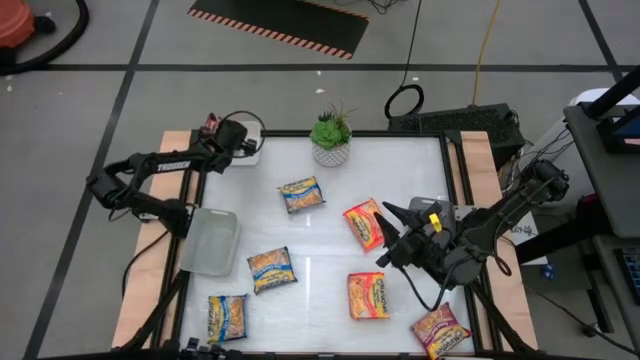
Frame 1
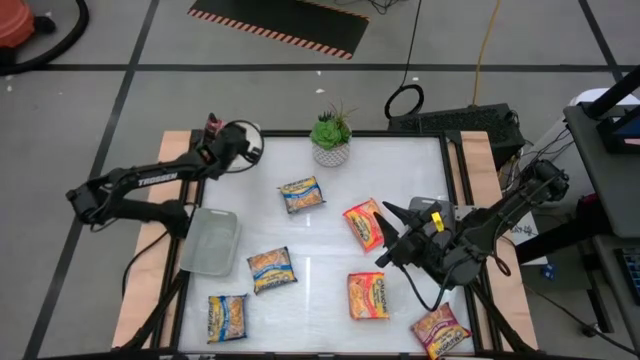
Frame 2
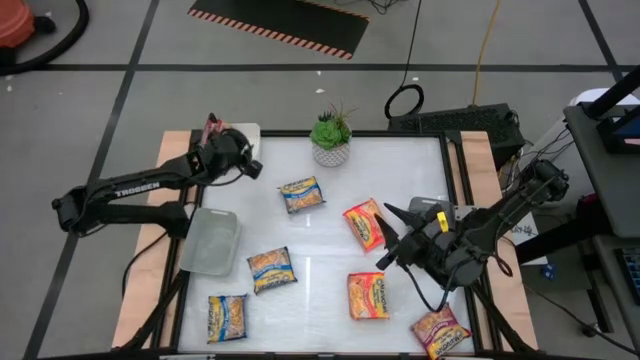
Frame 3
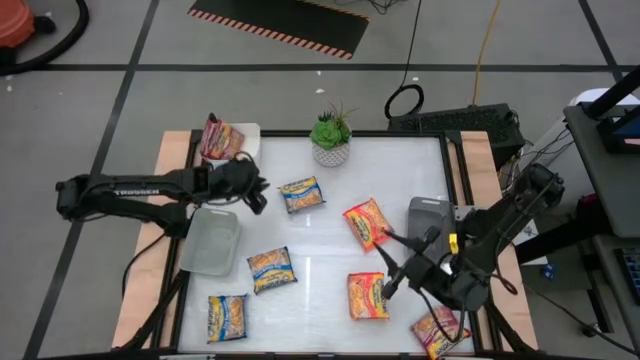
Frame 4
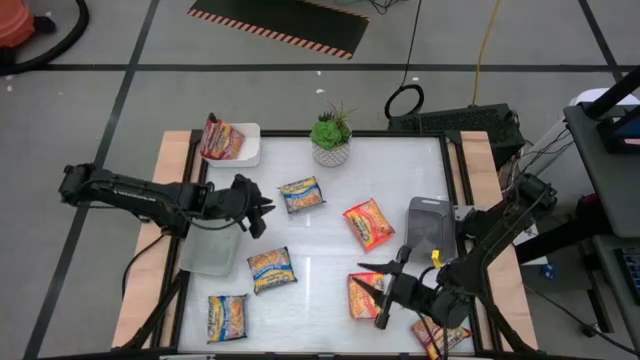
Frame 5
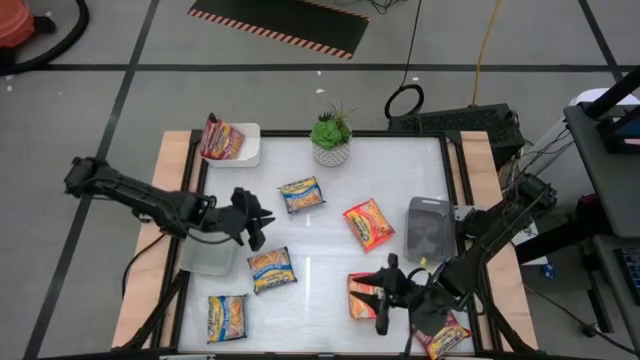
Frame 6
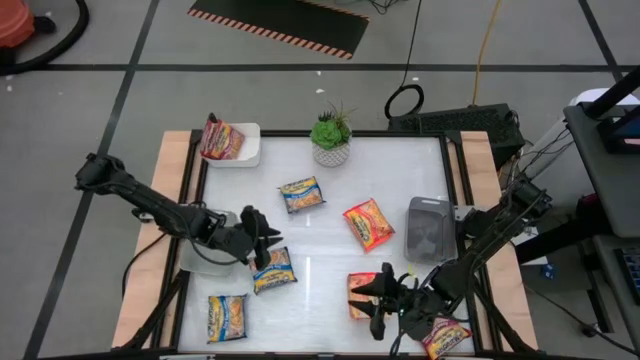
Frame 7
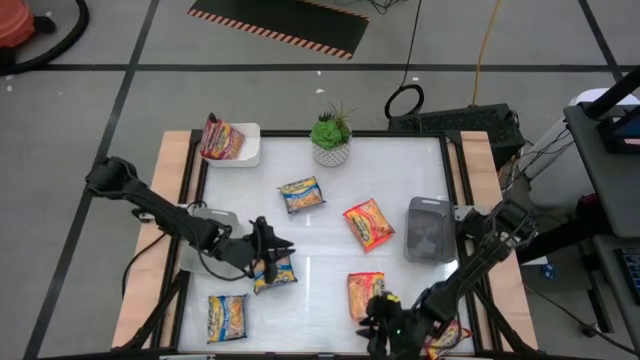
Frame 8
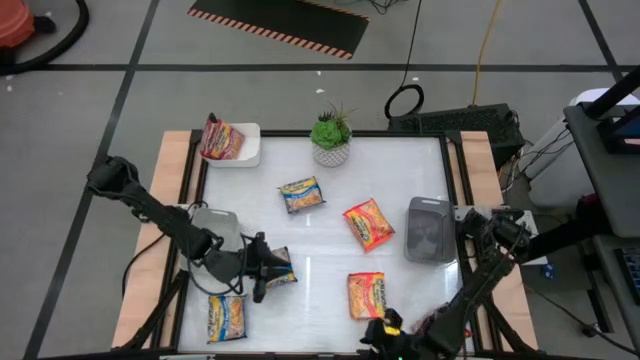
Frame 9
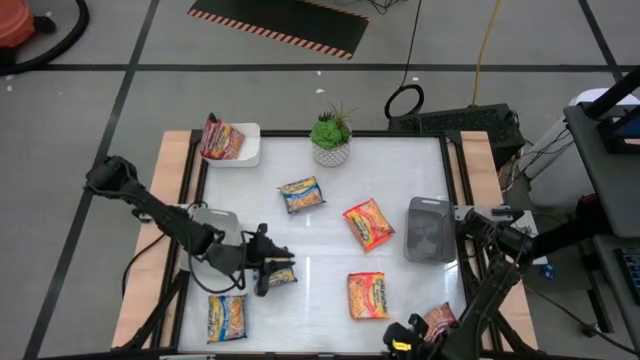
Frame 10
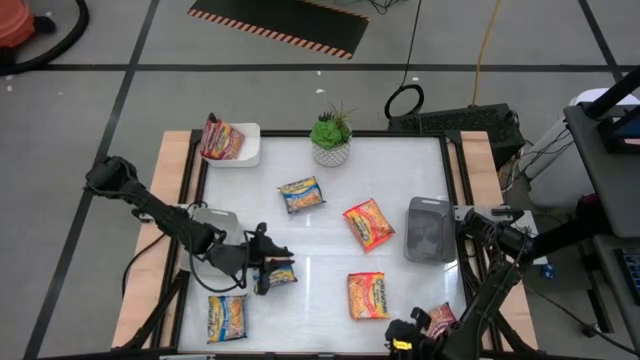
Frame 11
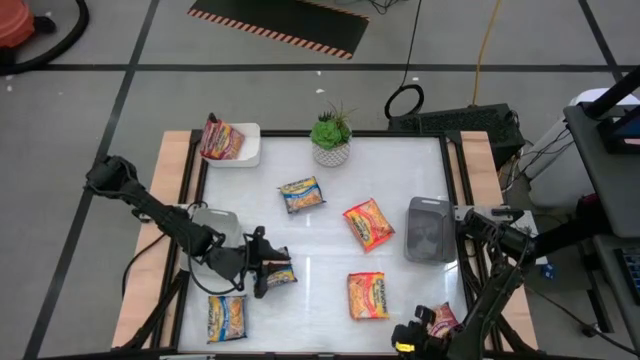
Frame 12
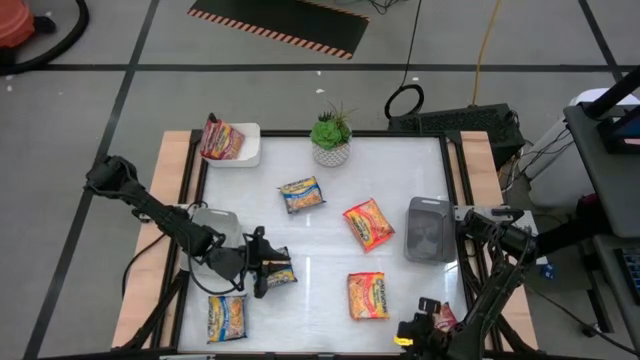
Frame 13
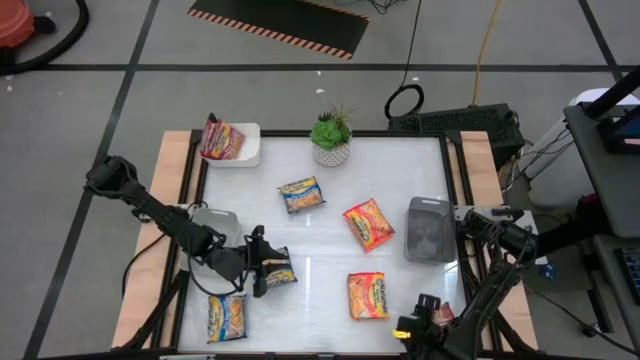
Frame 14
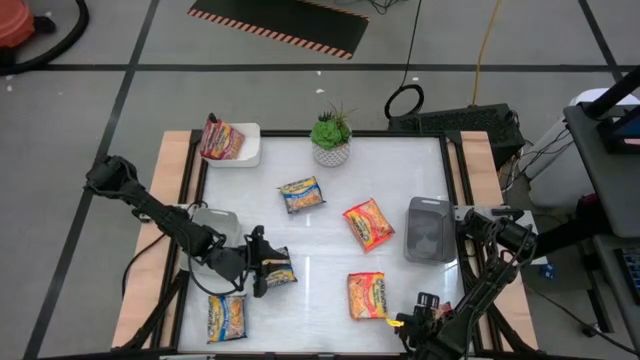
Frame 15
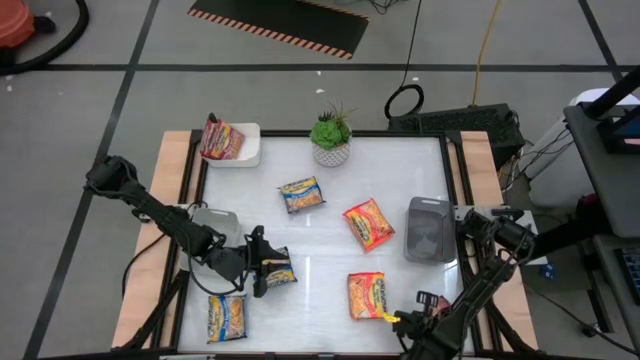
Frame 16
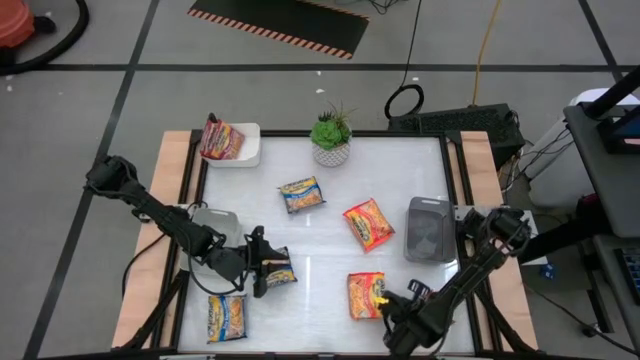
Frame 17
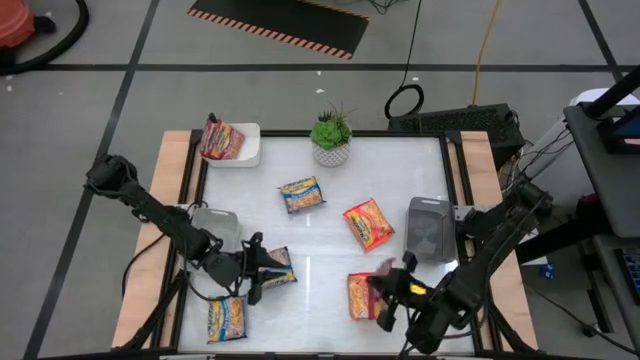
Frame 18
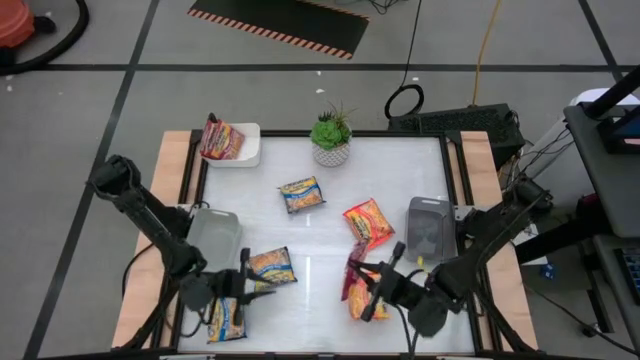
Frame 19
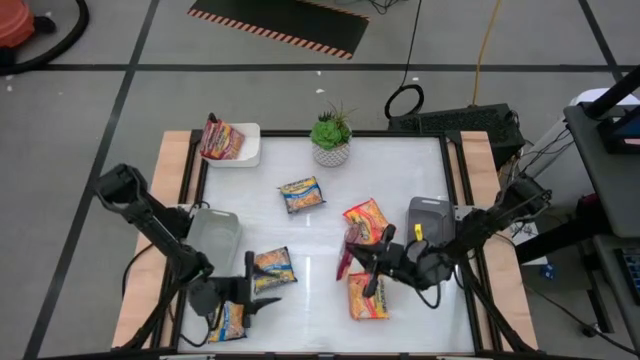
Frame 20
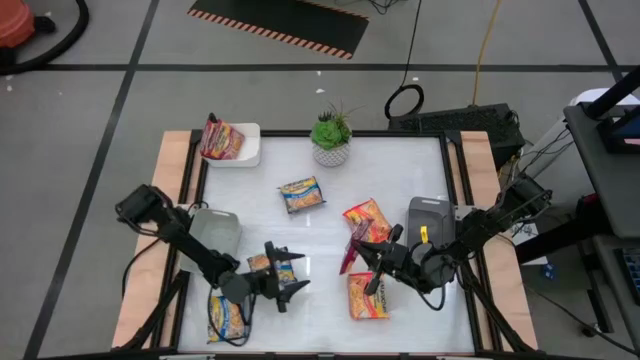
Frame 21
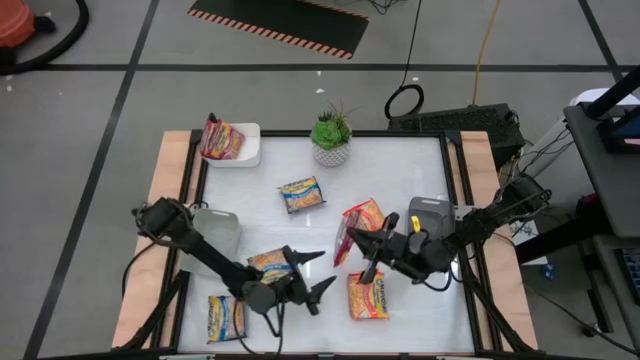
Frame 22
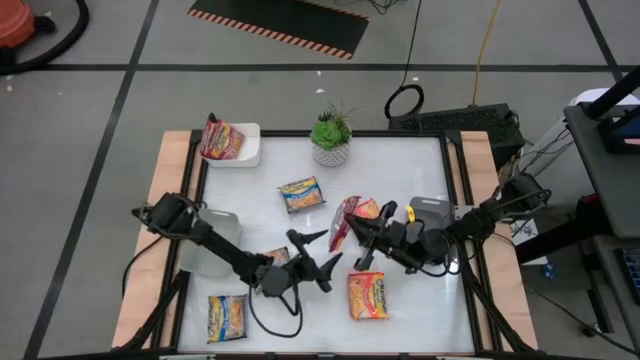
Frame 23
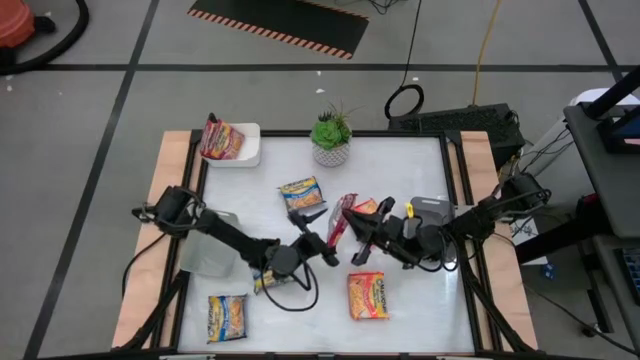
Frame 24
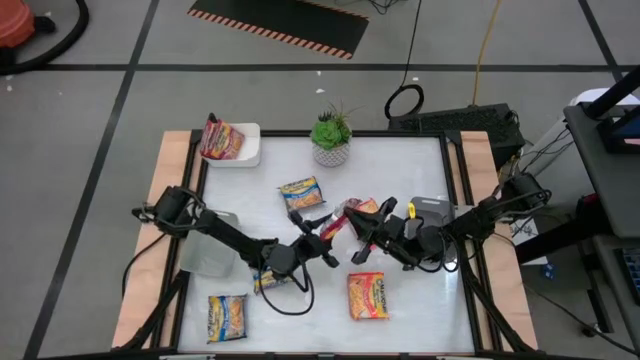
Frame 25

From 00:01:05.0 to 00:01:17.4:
Task: Sort Maruchan noodles
Put the red noodle pack into the white bin

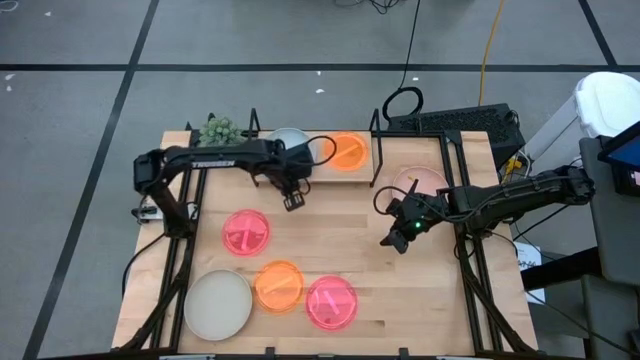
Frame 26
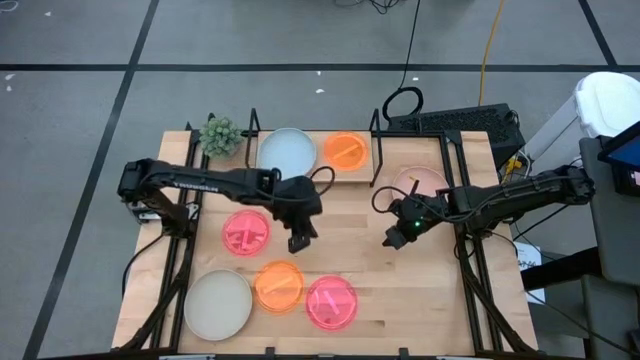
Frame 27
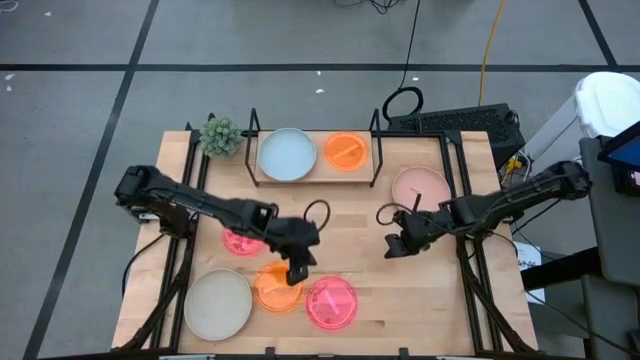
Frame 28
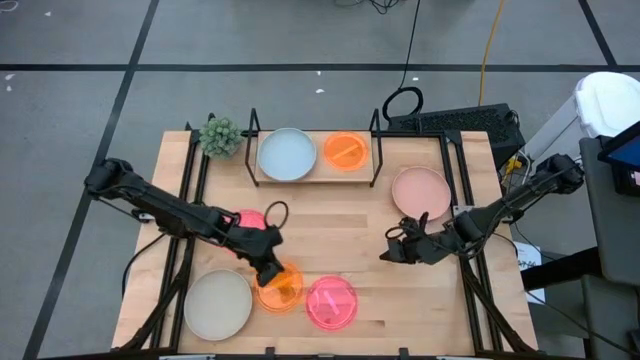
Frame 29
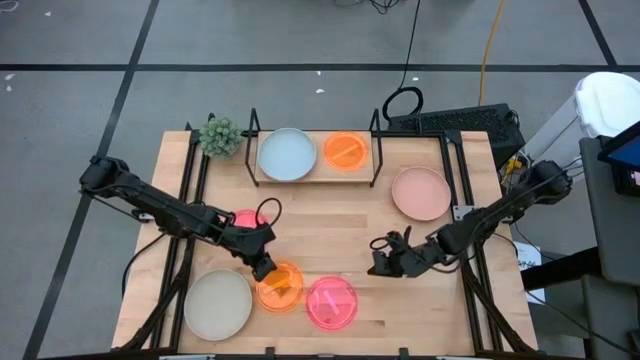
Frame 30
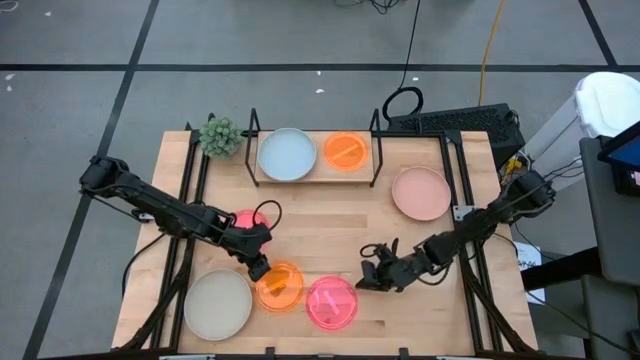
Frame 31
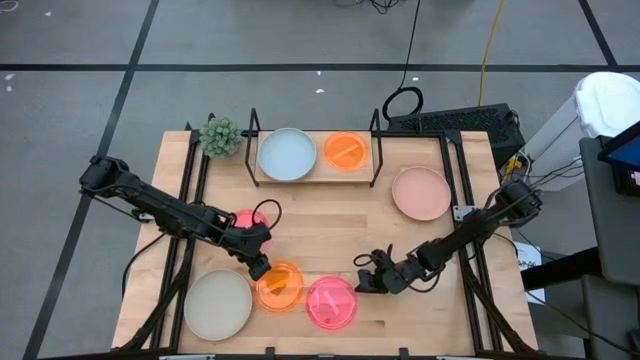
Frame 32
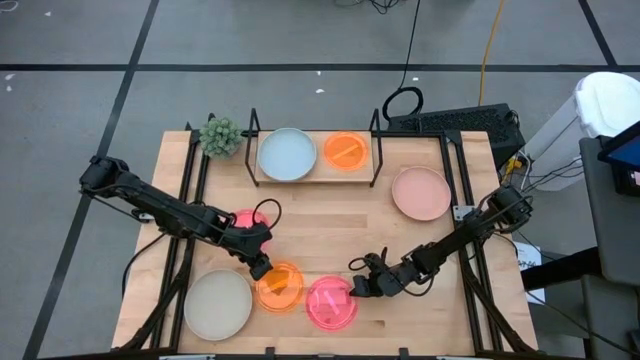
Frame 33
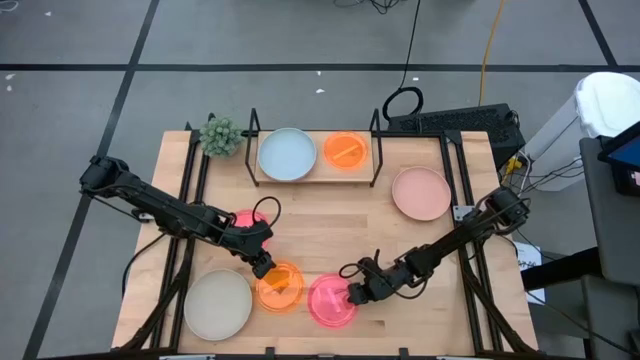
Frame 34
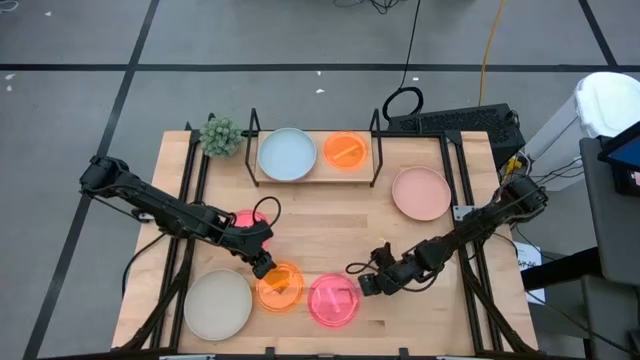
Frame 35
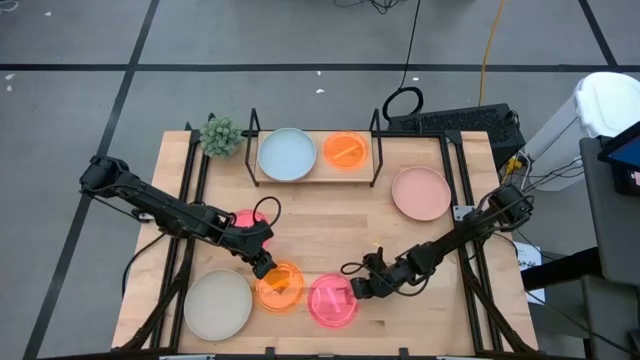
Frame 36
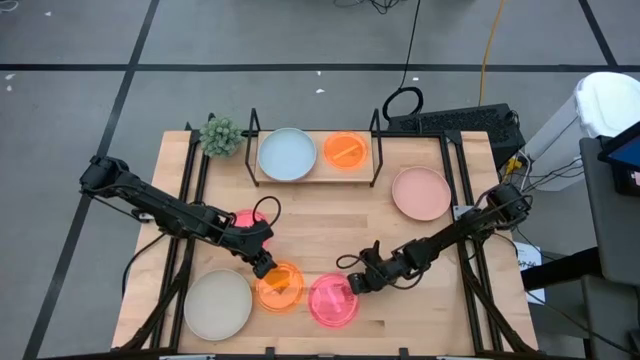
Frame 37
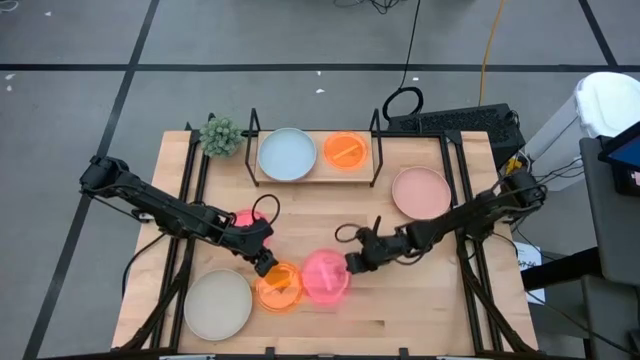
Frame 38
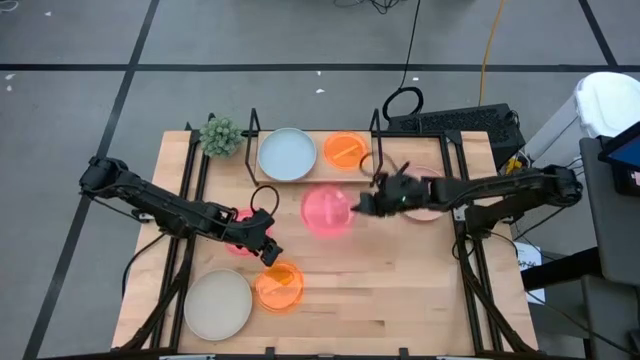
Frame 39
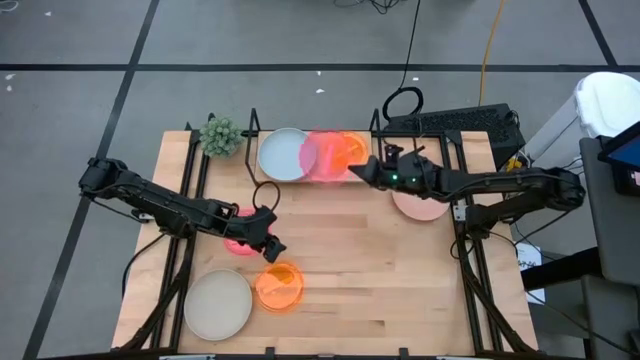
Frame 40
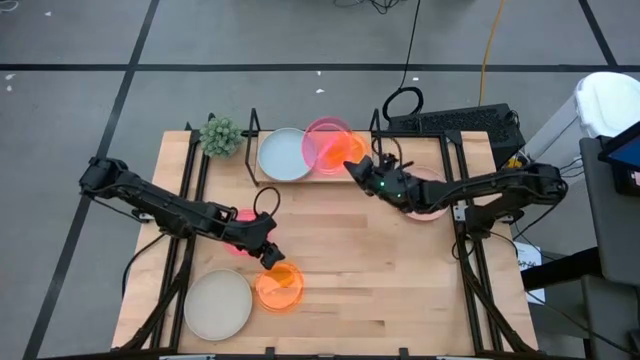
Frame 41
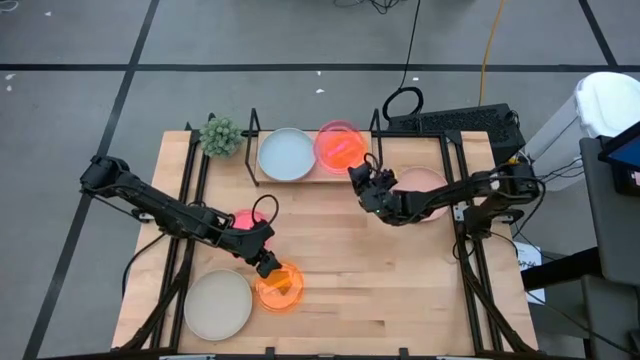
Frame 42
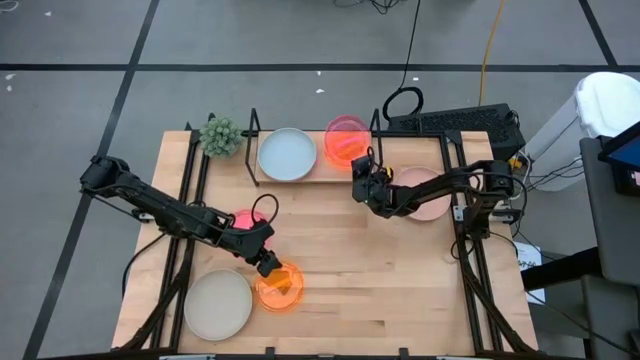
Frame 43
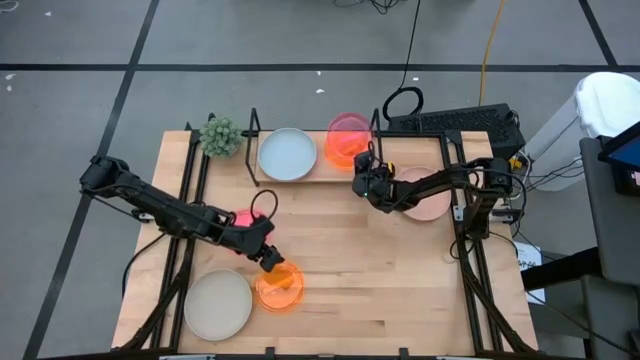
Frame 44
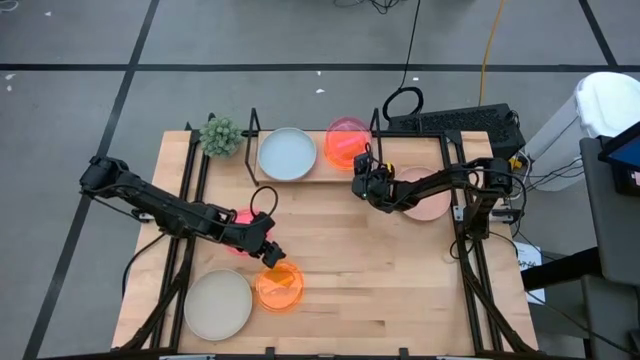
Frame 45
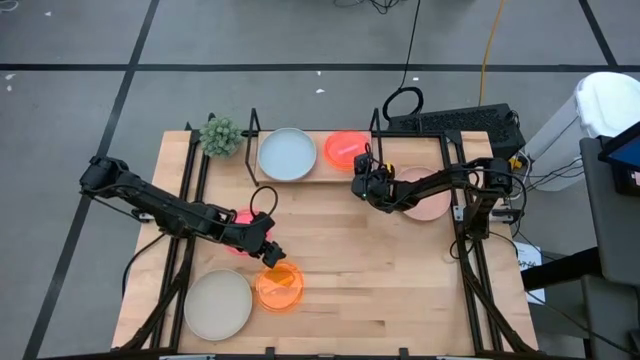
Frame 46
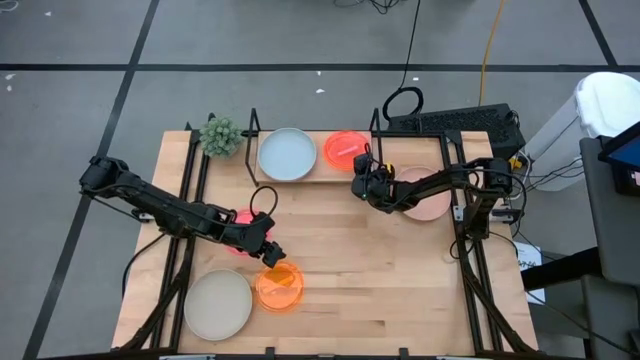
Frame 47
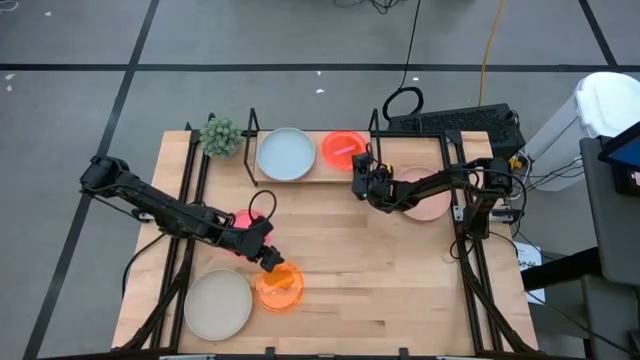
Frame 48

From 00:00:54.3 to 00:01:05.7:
Task: Place and stack plates onto a shelf
Stack the bottom pink transparent plate on the orange plate on the shelf
